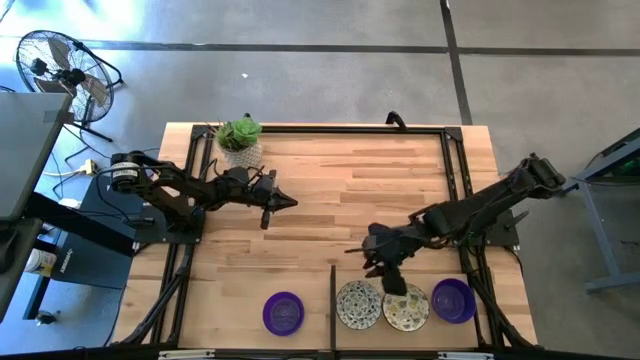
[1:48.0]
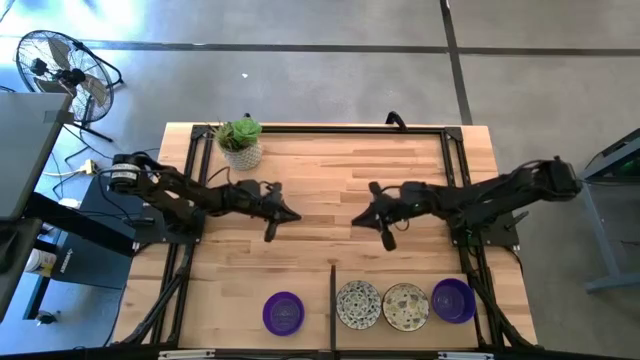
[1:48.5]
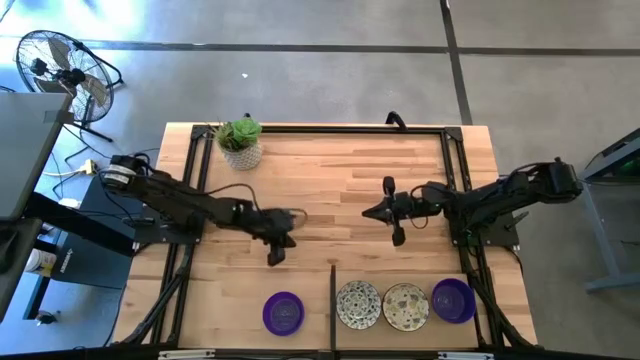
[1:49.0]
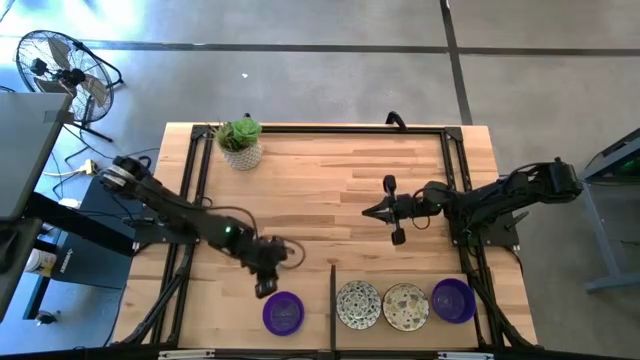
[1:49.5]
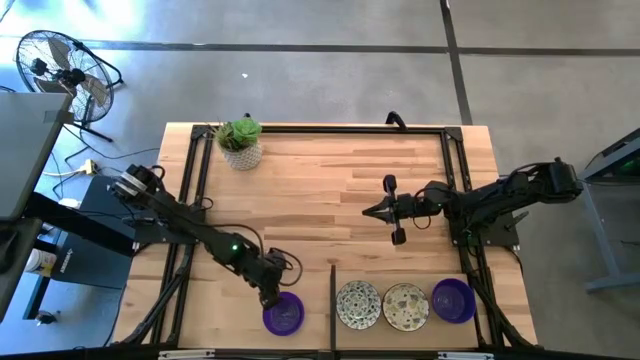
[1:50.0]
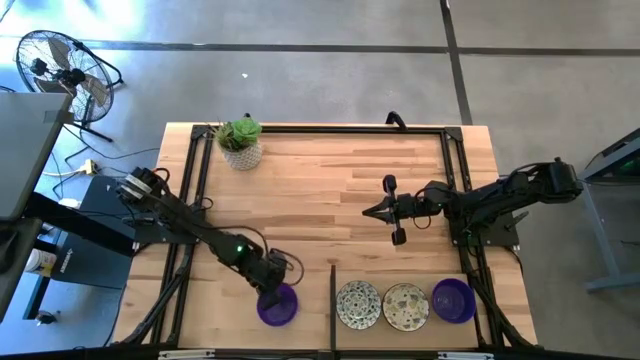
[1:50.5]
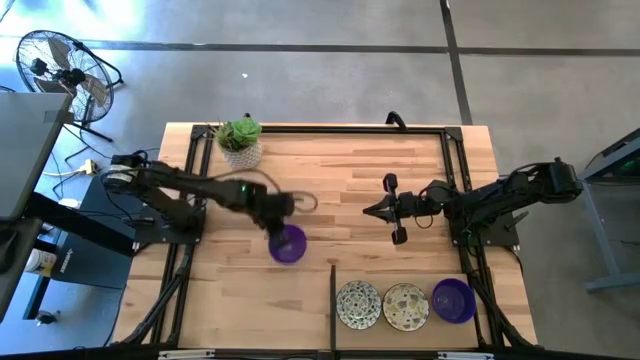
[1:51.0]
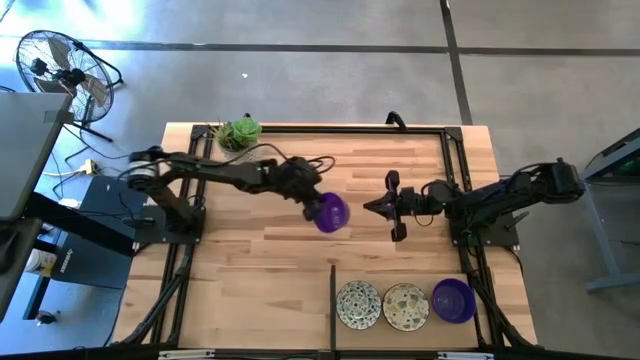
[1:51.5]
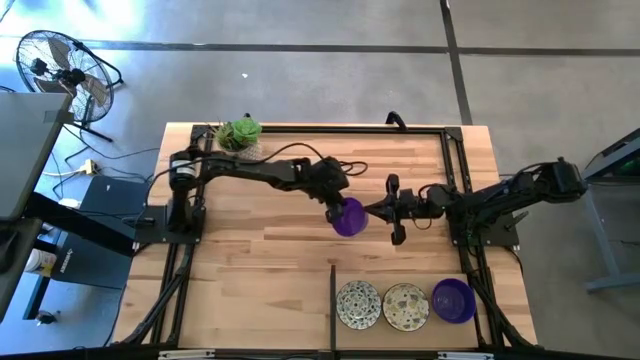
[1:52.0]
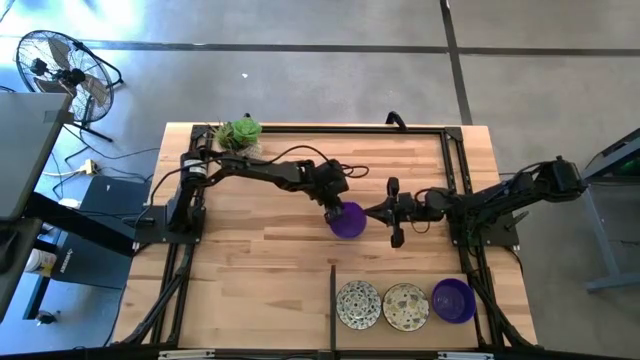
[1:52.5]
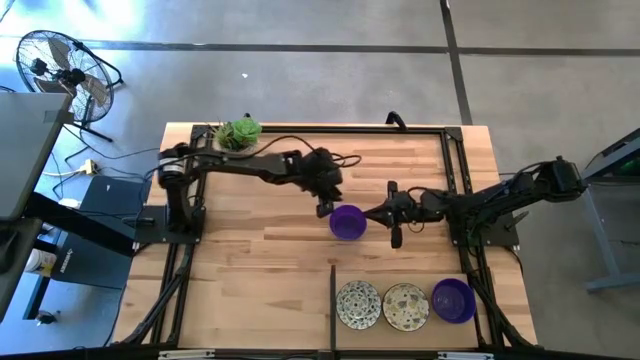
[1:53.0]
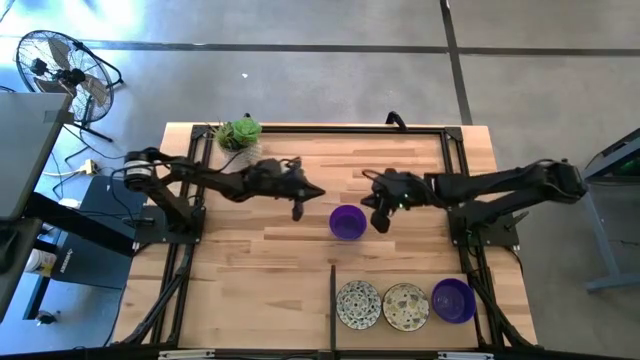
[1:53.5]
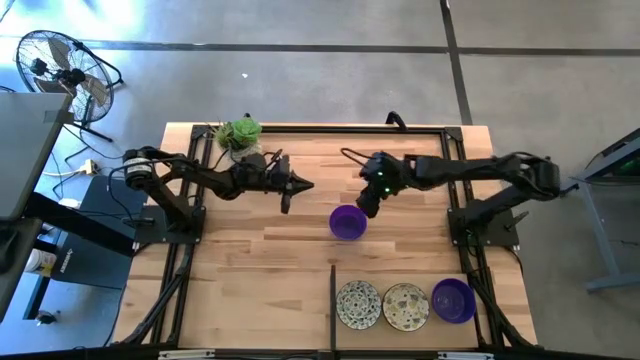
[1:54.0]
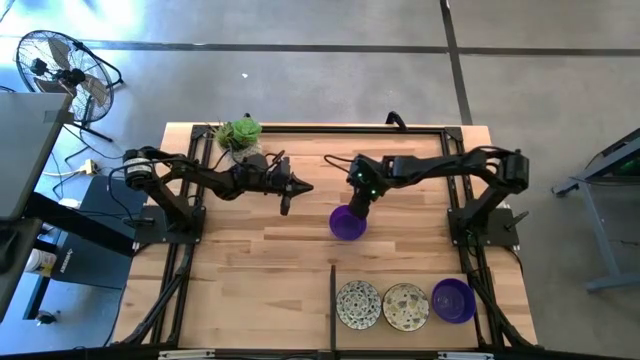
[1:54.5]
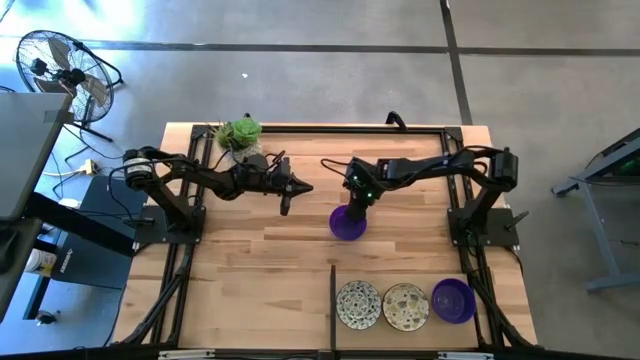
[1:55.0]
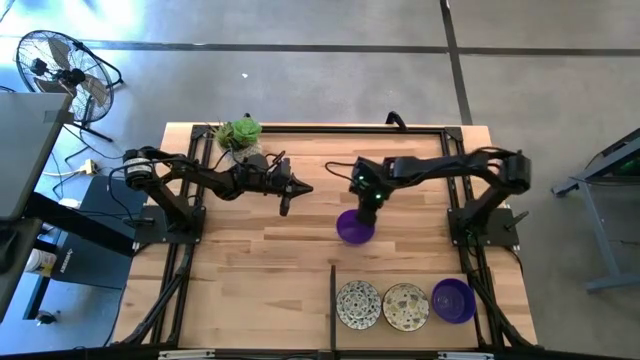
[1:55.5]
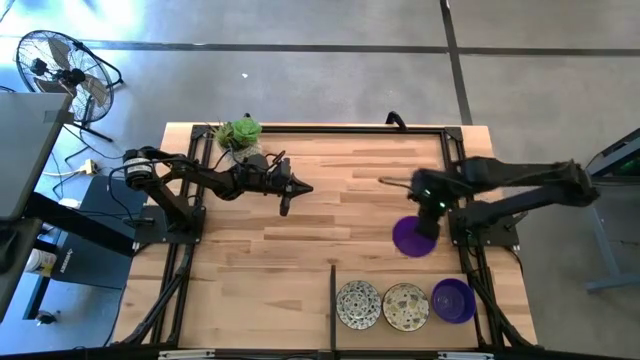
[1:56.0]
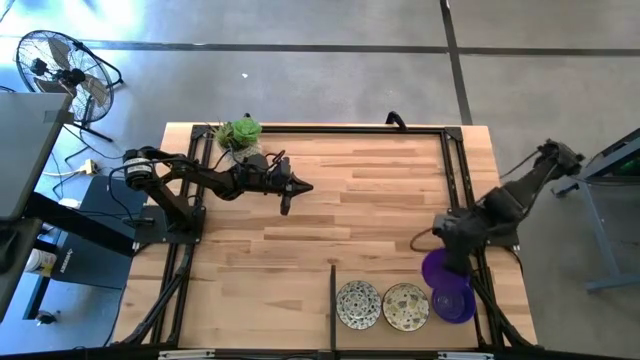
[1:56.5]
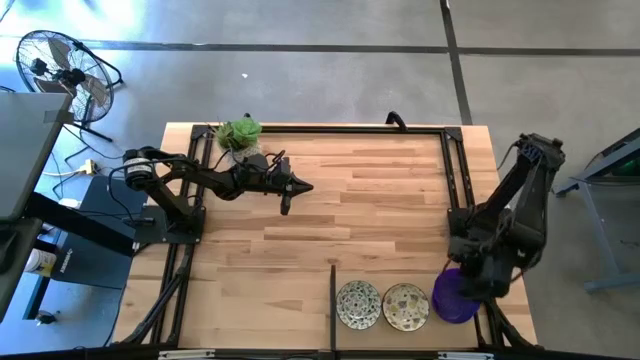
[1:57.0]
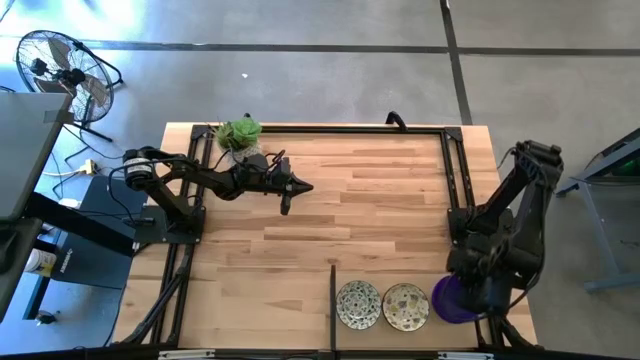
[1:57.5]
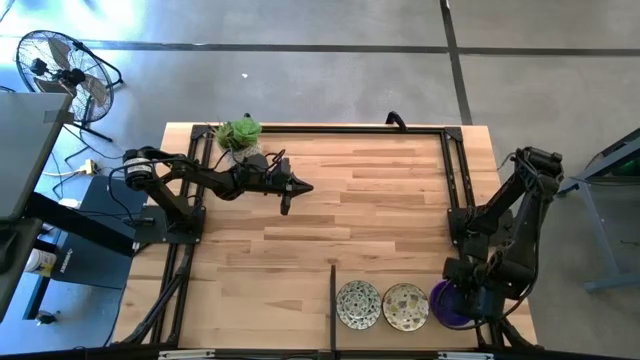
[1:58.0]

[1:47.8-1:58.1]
Task: Pick & Place Mini bowls
Stack the purple bowl on the purple bowls on the shelf

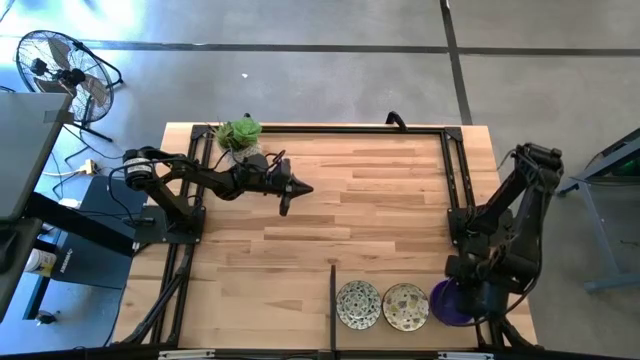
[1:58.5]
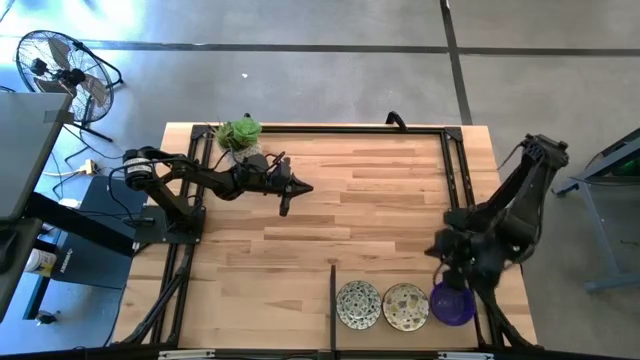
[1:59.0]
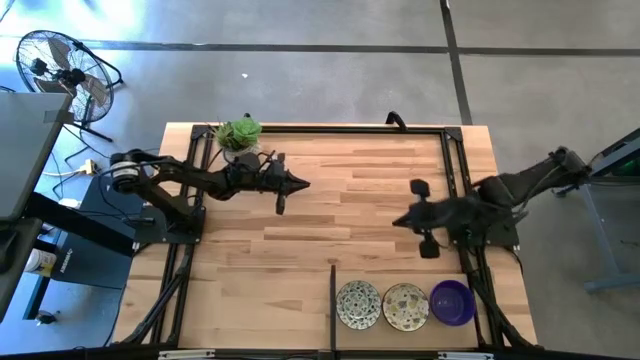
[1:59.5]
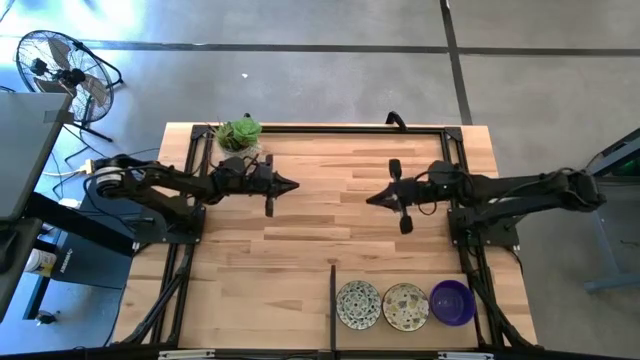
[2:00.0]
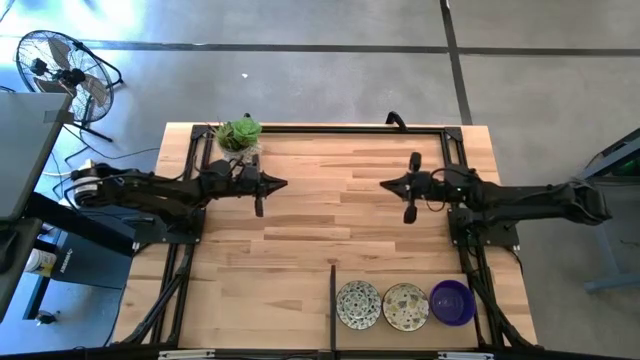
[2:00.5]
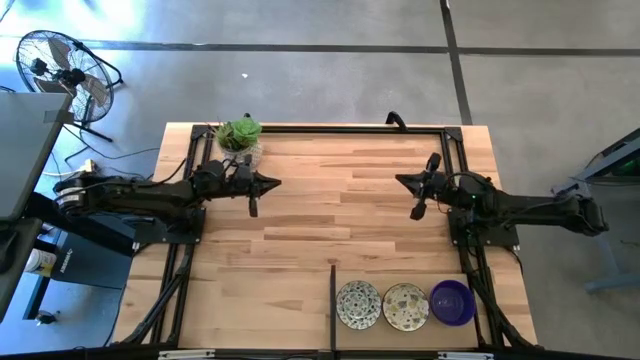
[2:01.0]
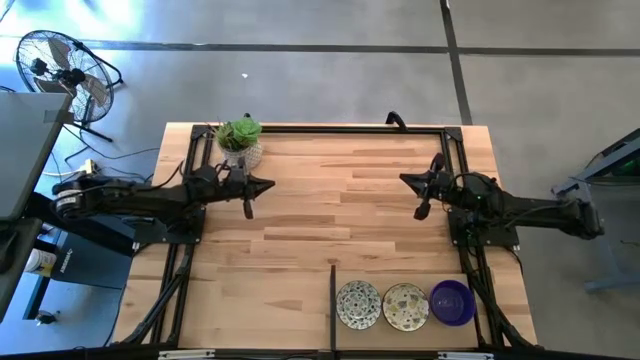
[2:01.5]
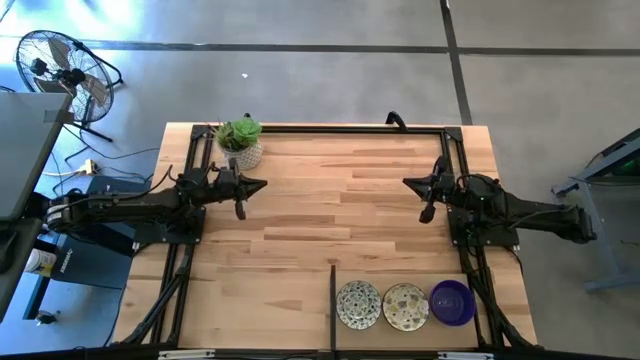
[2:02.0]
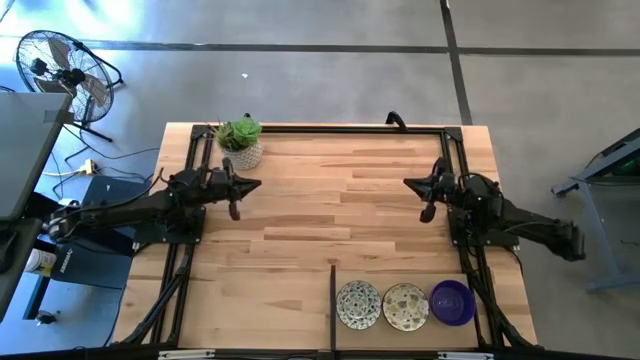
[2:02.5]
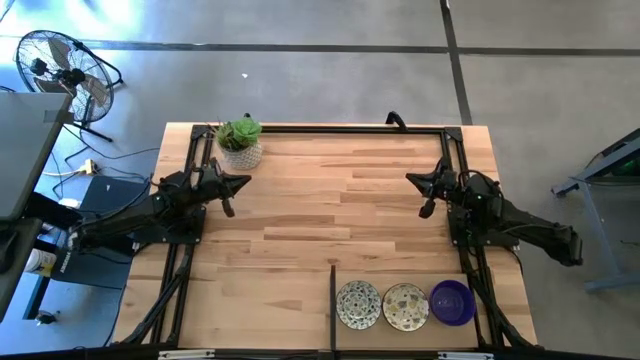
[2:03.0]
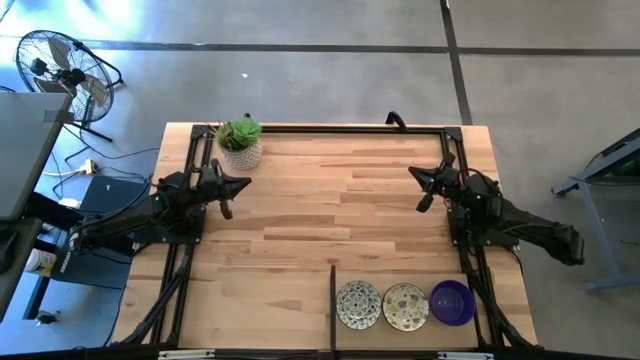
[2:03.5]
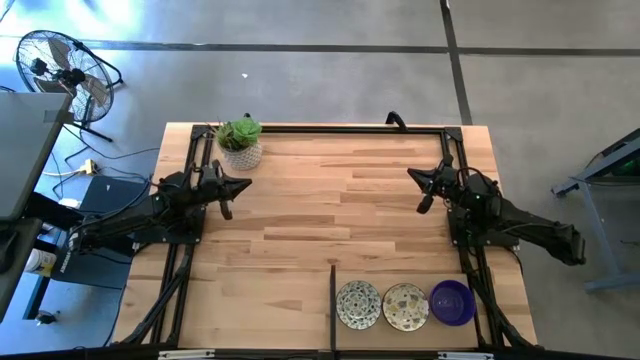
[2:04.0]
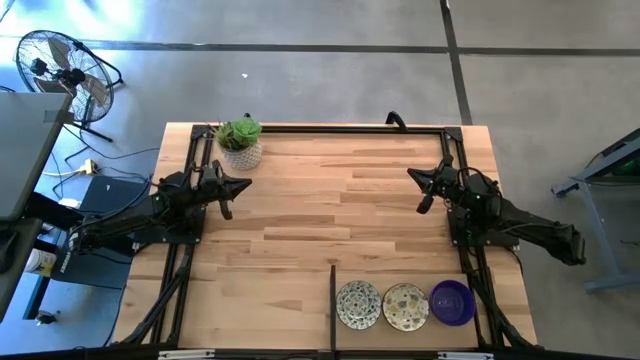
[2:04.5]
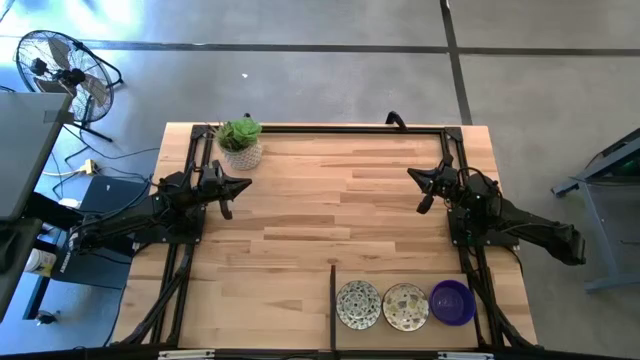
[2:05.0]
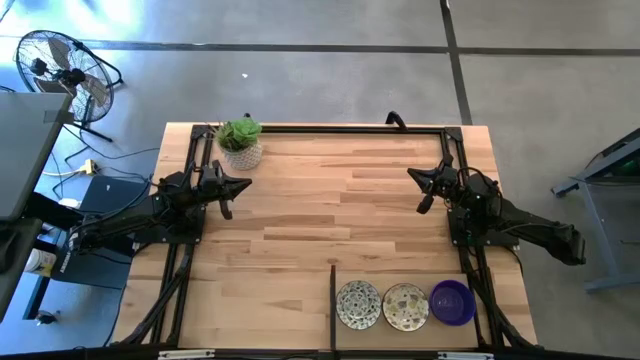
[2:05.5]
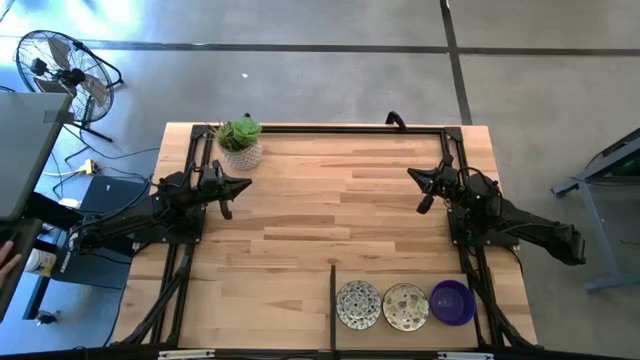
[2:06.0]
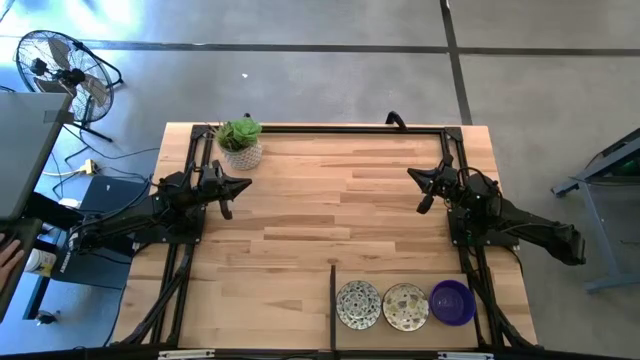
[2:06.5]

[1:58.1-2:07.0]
Return to Home Position

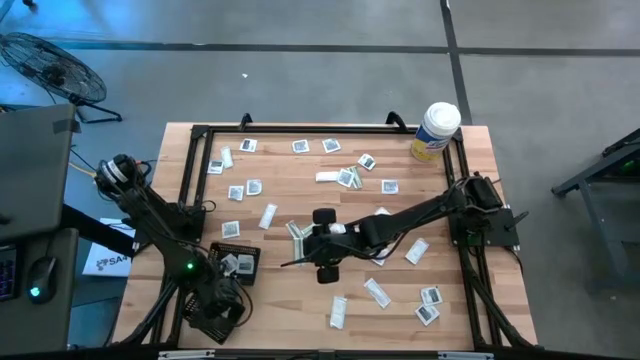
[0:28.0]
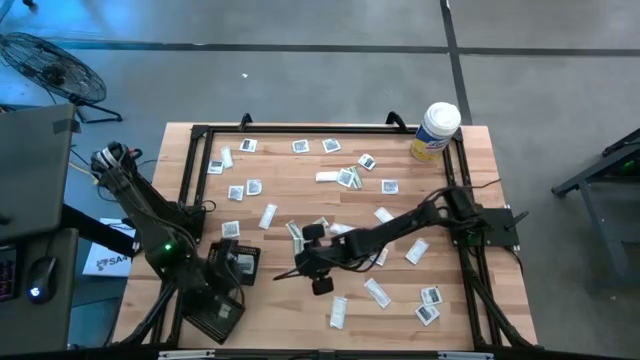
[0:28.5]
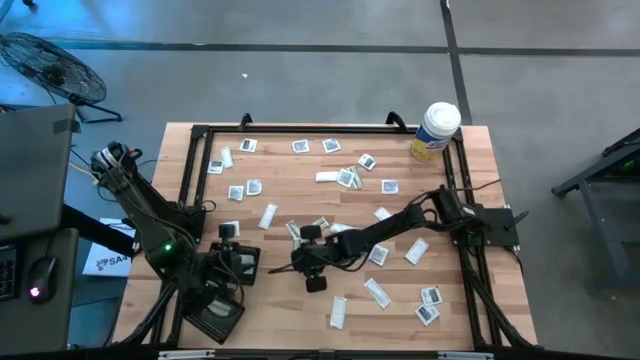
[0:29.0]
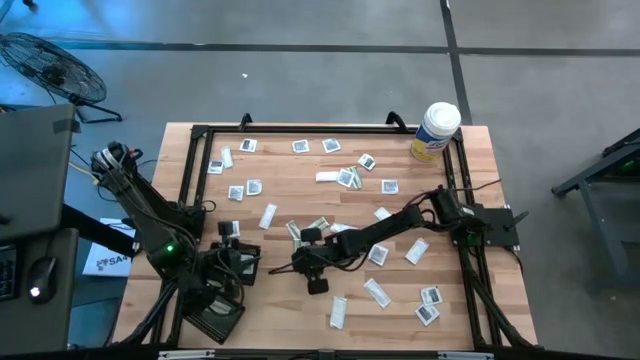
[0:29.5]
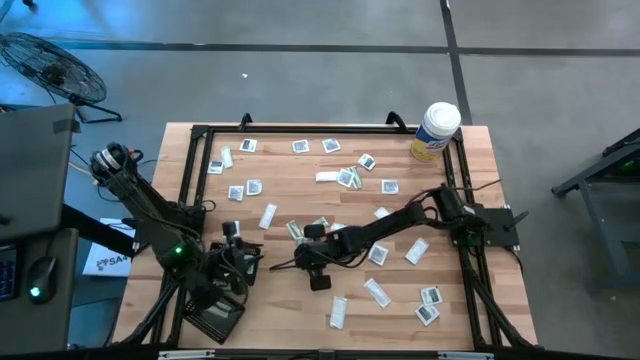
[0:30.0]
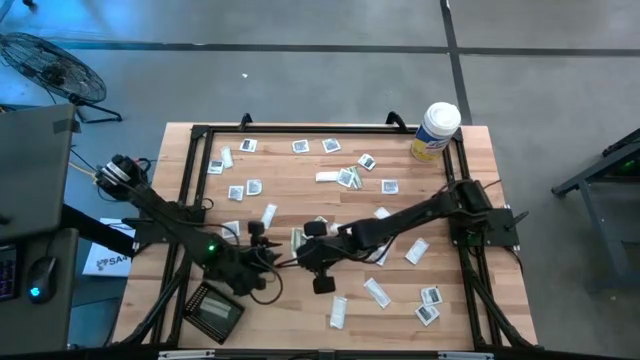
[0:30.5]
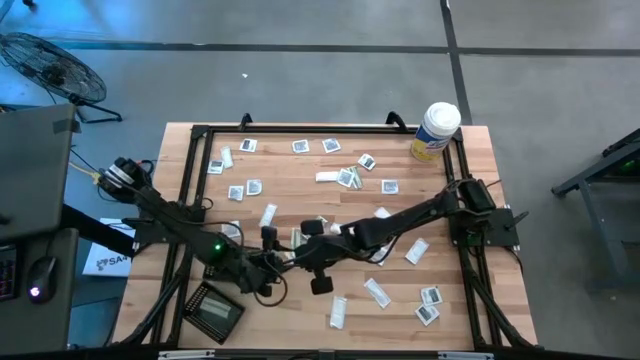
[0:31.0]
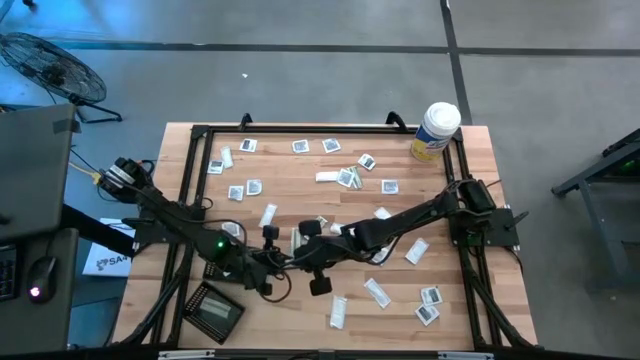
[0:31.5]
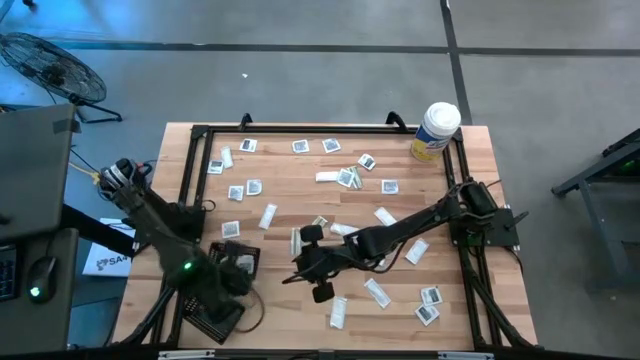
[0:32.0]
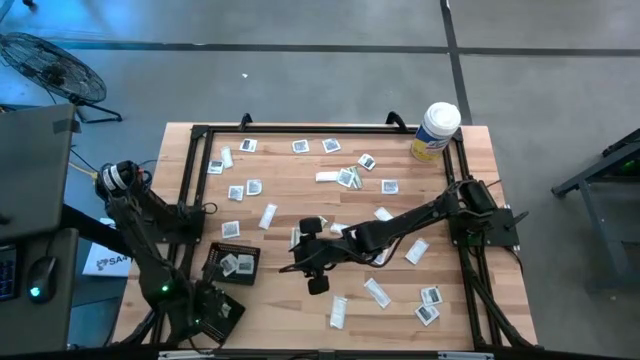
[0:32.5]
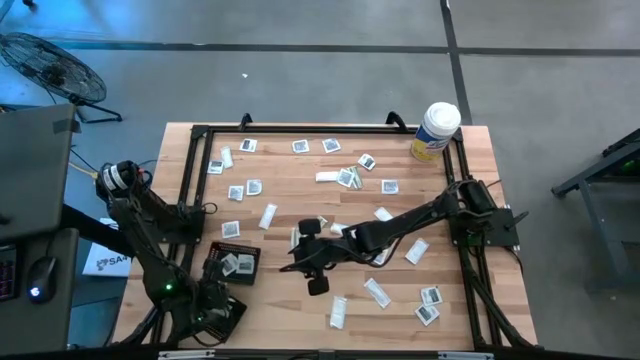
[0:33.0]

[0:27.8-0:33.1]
Task: Pick & Place First Aid Supplies
Put the bandage into the bottom black bin
